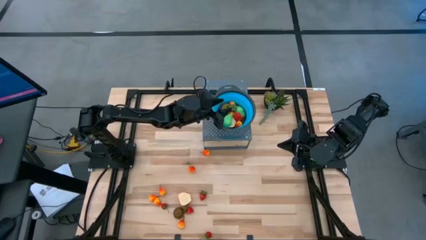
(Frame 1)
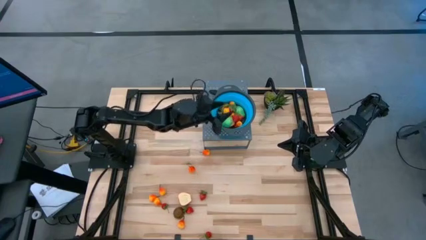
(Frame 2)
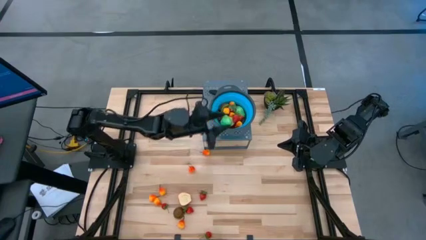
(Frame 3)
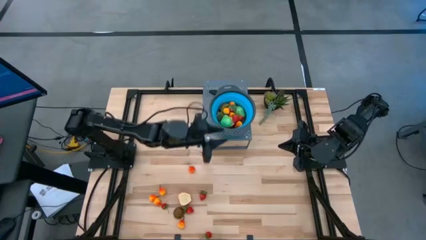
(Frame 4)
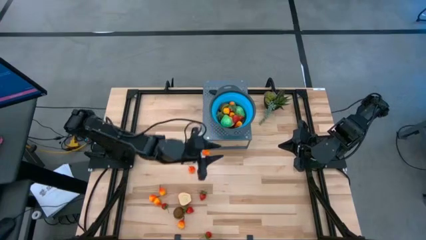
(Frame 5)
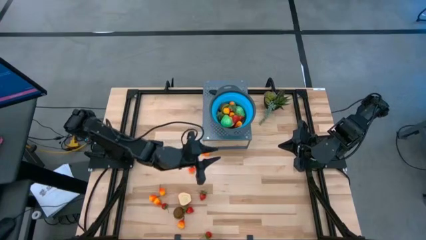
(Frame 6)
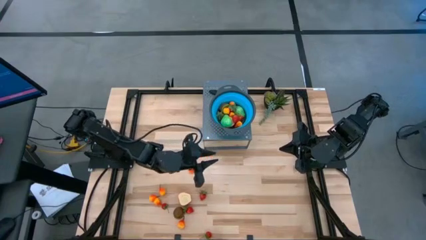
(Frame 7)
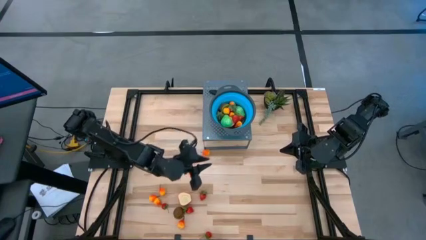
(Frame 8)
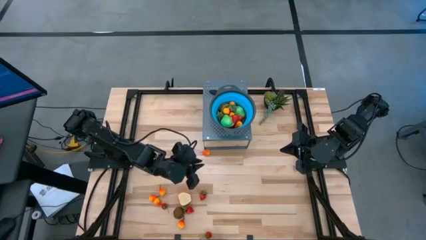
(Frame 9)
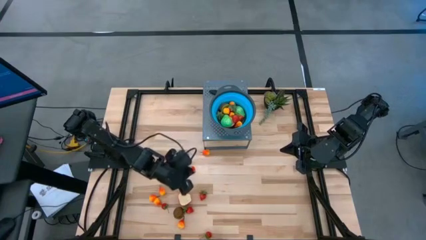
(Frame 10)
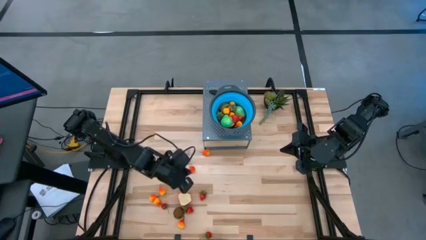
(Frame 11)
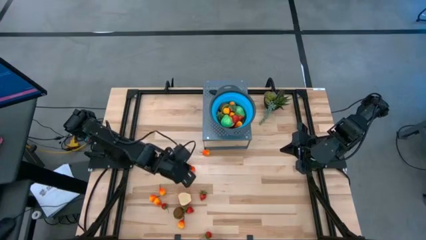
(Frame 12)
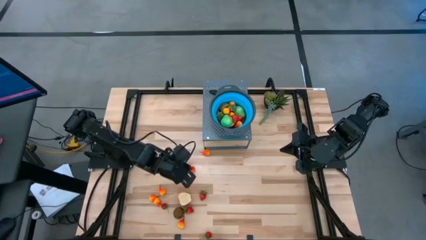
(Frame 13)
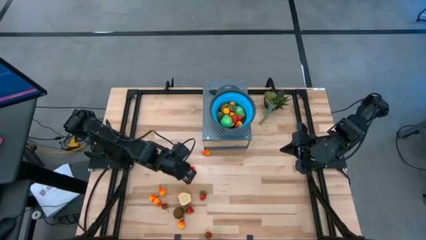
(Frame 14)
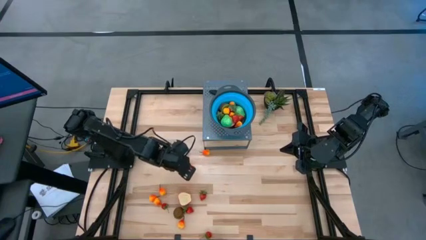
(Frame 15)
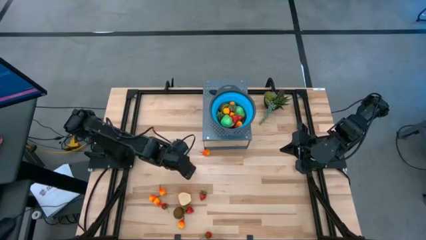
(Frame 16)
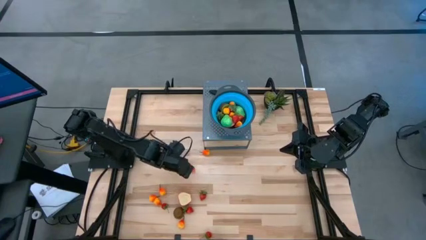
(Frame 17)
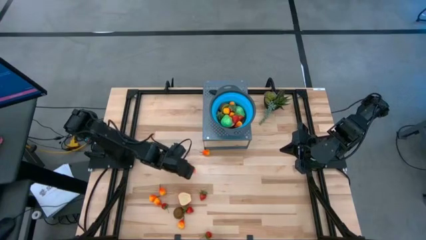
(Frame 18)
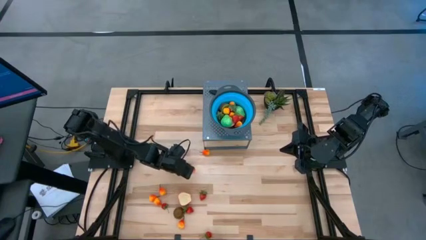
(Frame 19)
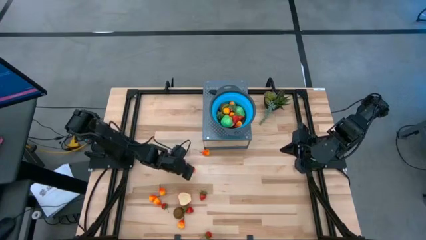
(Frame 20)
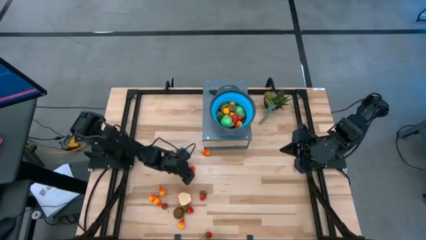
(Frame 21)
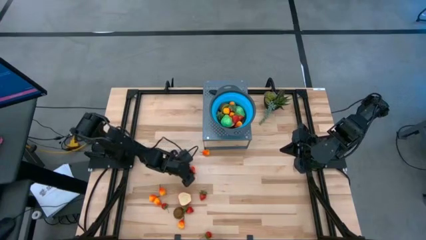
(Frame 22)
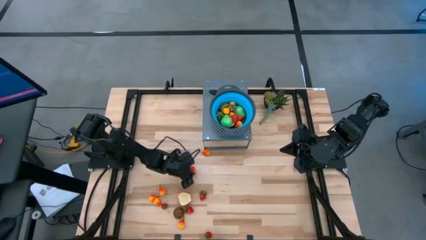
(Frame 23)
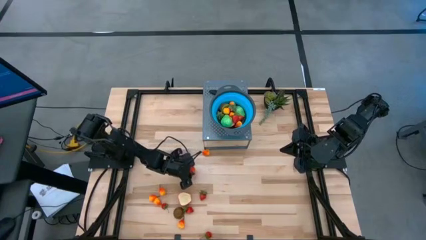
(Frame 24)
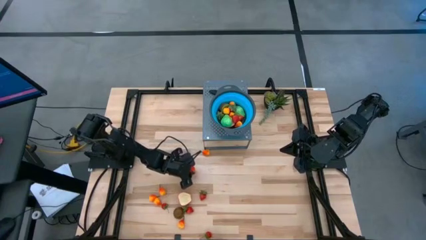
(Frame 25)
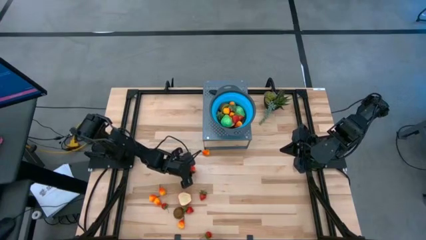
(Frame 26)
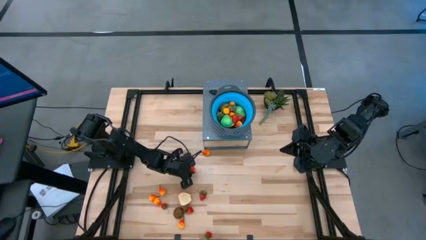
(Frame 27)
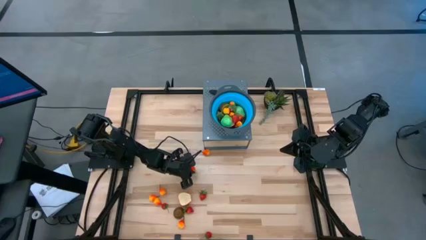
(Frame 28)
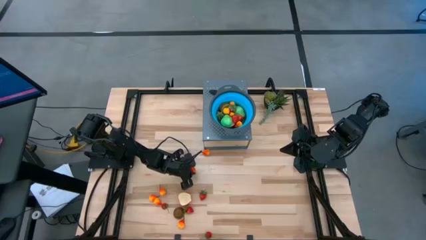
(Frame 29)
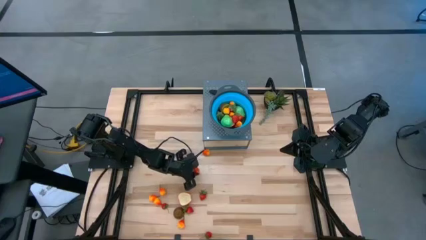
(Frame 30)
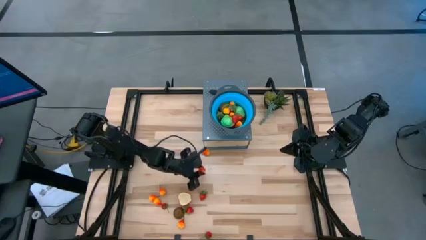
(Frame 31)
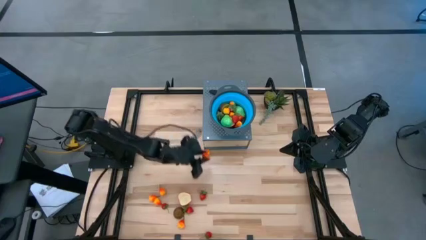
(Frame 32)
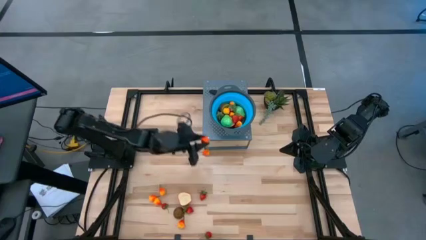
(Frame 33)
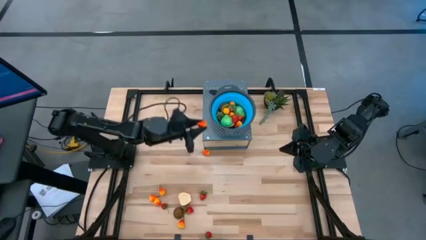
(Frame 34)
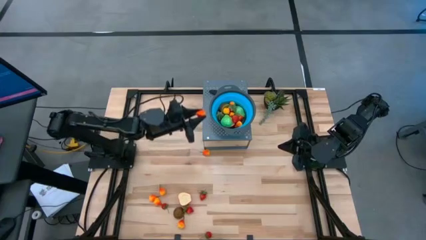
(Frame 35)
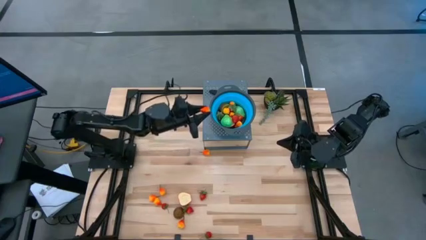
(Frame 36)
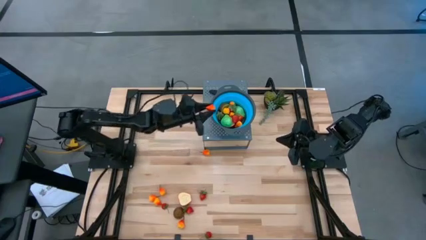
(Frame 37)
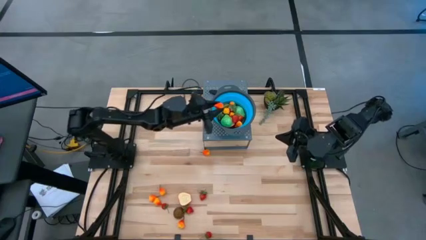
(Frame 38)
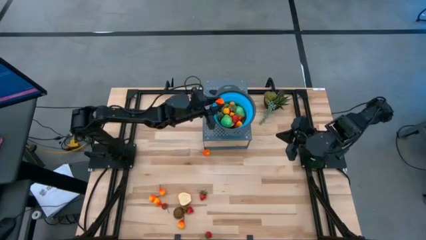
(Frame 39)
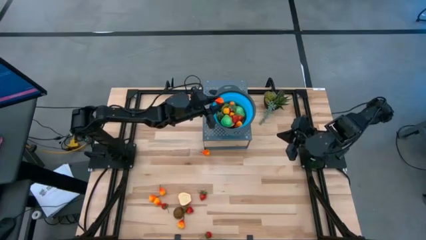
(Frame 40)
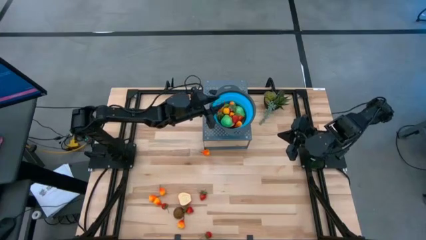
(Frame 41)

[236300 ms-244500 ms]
Task: Pick & Place Fruit
Put the peach into the strainer bowl

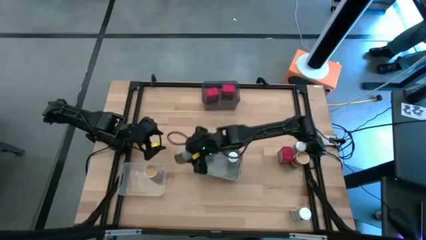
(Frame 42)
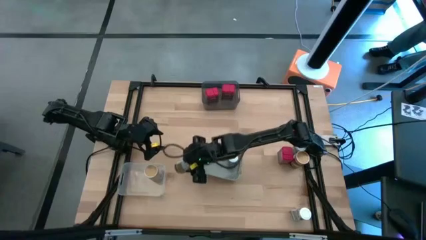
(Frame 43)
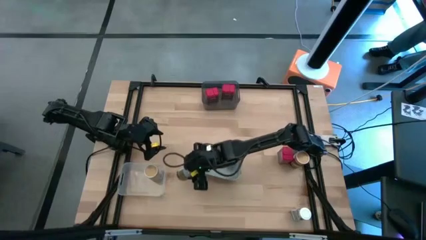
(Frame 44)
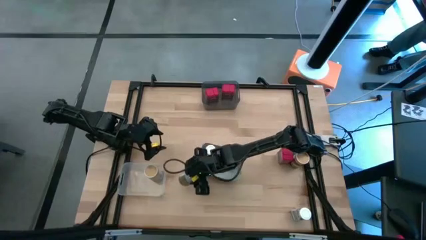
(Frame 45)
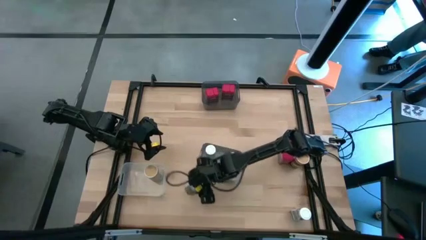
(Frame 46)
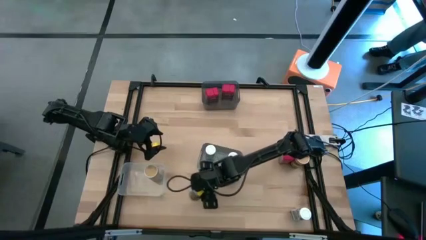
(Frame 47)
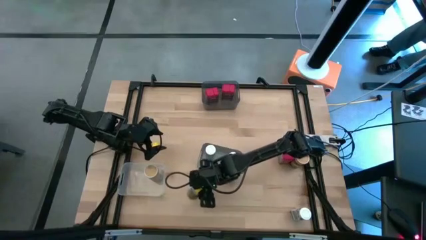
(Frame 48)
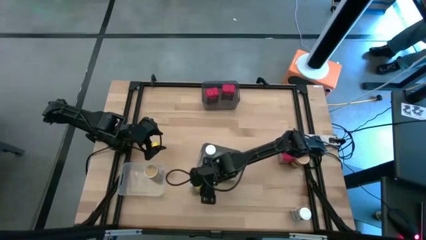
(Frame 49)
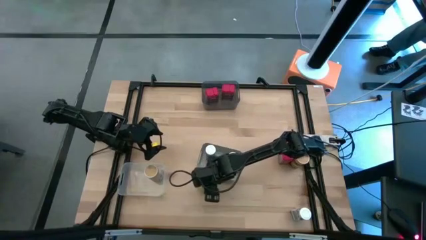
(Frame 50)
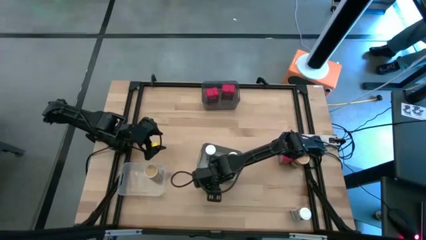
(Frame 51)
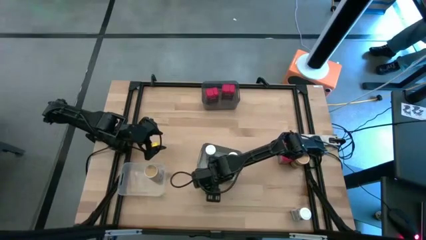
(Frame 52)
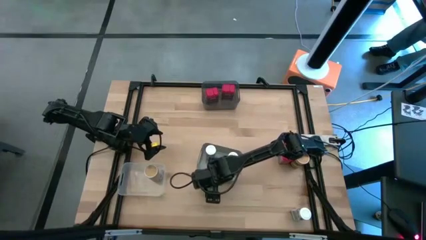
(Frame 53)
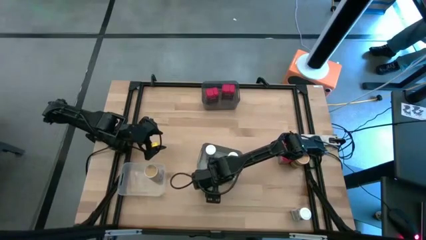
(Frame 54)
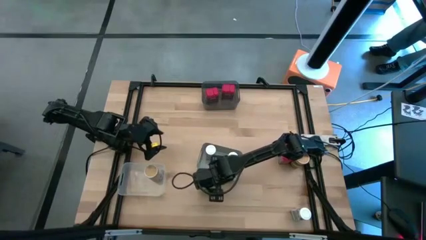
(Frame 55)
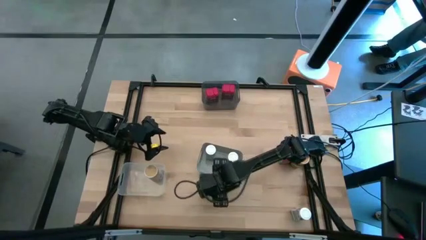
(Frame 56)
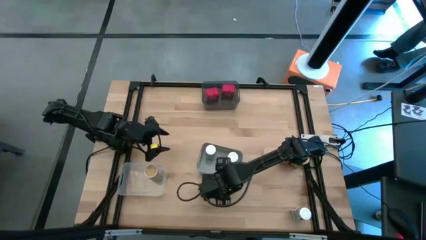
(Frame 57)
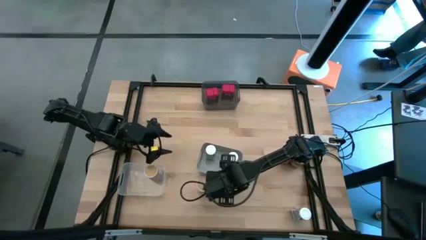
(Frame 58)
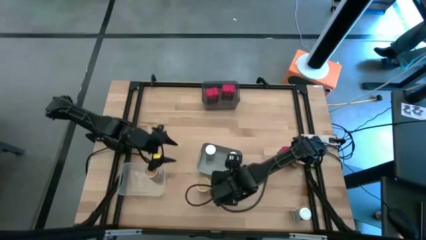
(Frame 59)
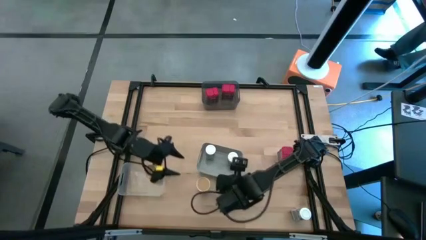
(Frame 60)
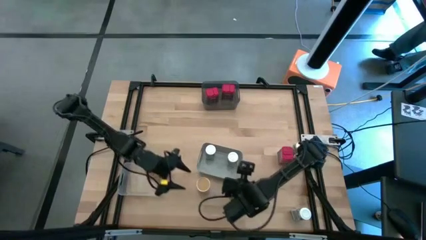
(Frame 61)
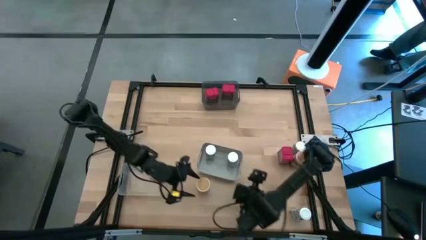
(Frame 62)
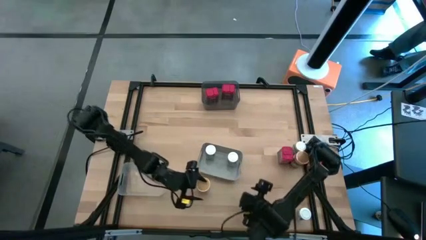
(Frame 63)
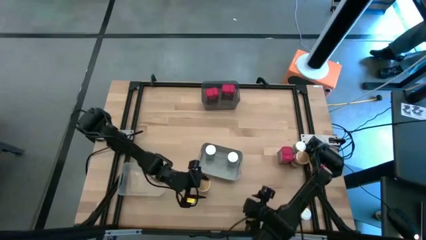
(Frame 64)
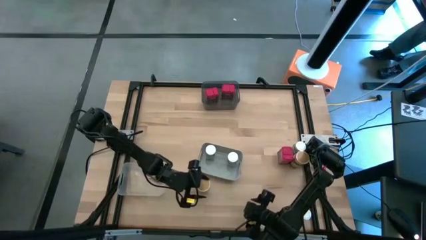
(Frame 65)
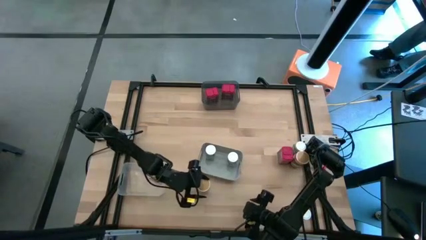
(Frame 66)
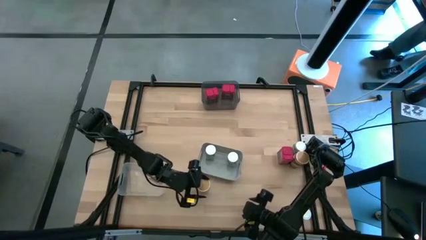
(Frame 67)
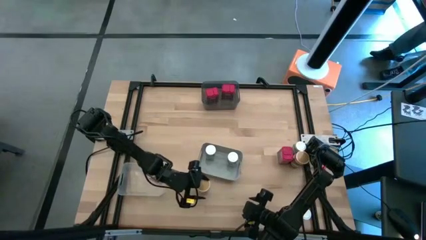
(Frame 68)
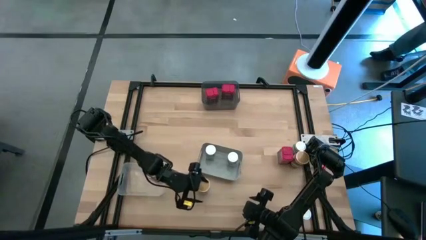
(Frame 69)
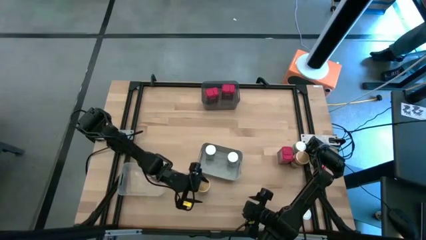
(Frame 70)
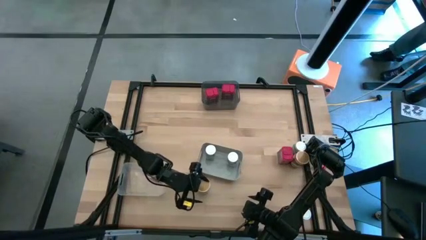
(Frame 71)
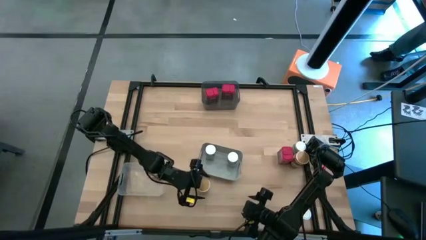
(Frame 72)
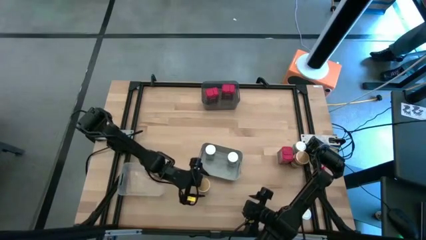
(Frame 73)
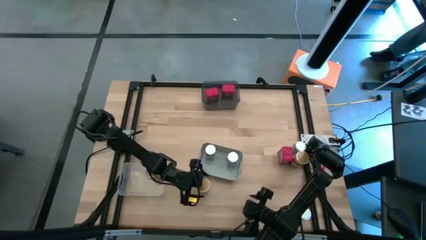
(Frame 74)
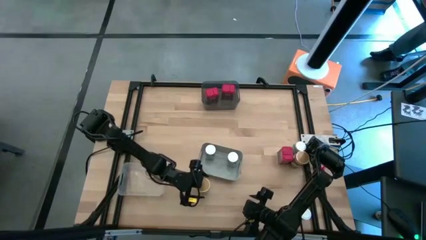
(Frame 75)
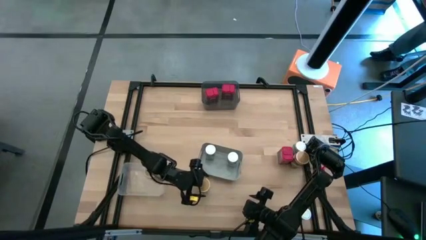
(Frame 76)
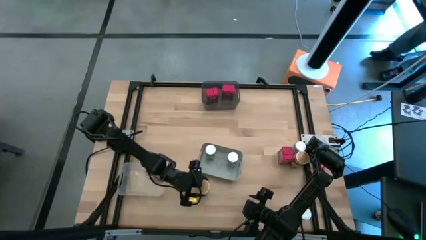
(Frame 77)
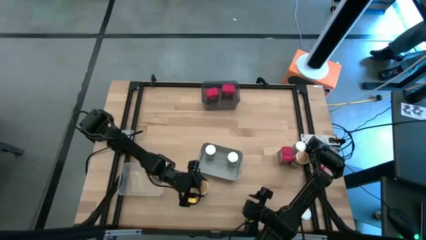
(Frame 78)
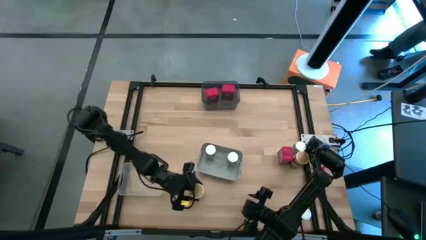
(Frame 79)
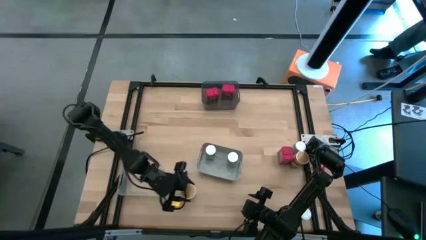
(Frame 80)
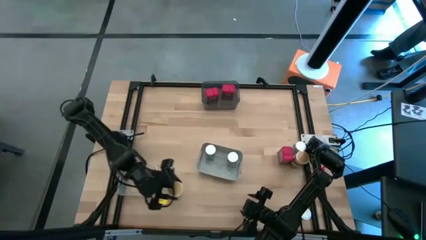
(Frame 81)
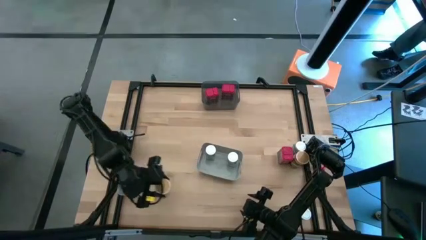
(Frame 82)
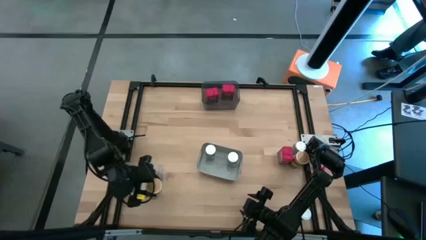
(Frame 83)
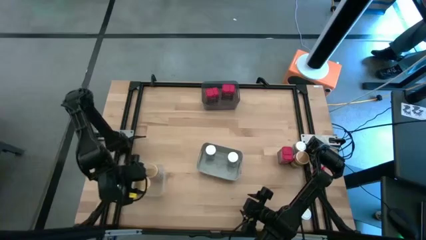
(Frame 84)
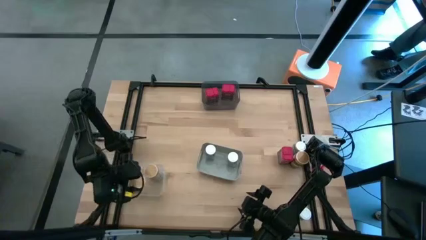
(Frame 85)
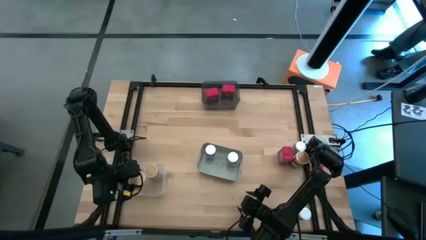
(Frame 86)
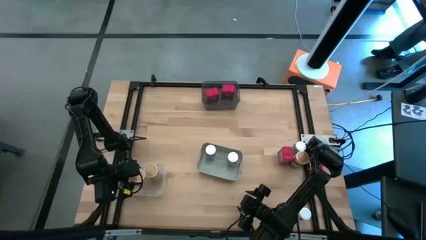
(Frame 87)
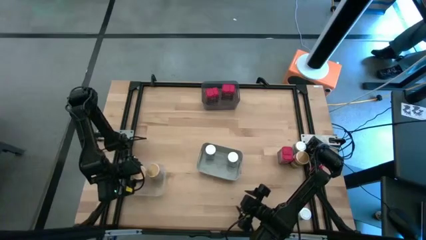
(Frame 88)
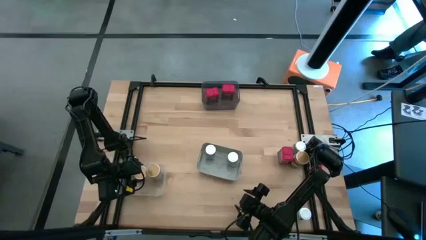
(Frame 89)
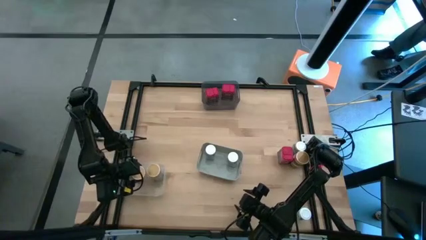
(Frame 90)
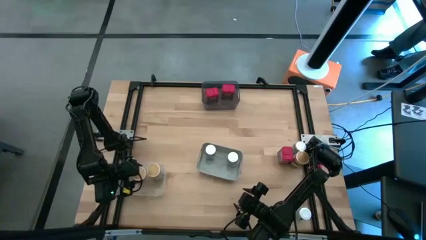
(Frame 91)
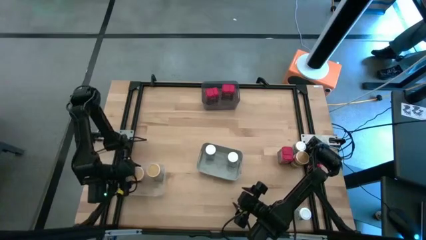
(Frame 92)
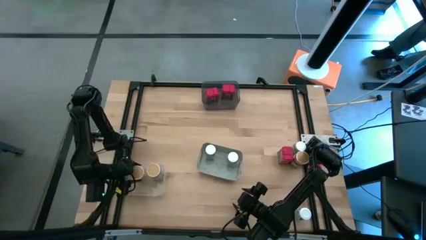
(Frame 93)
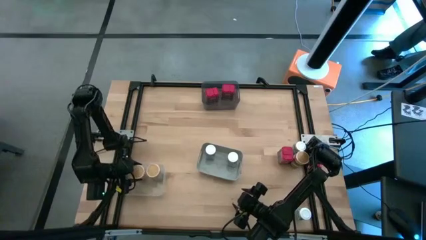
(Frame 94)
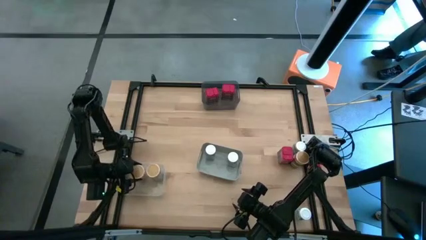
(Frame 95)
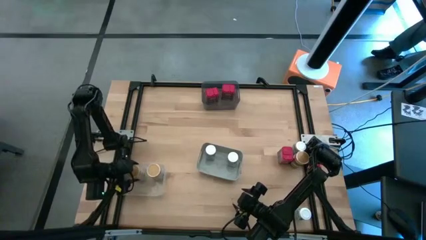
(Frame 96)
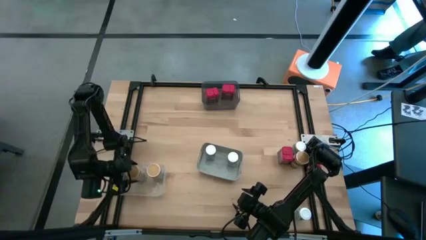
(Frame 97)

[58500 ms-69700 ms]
Task: Sort spices by type
Put the top brown seasoning bottle into the transparent bin
